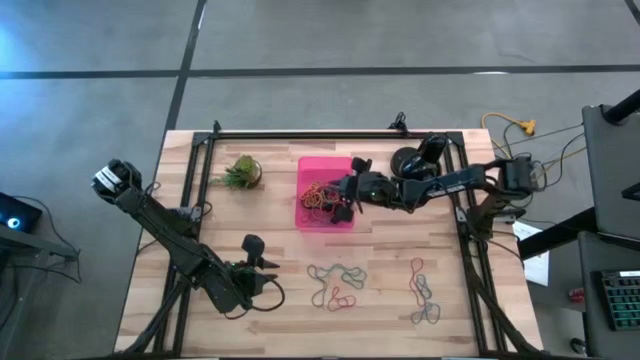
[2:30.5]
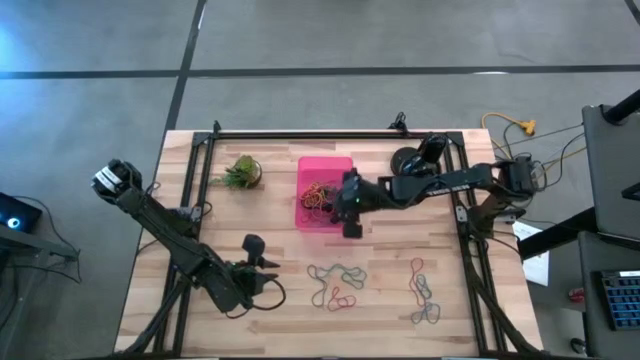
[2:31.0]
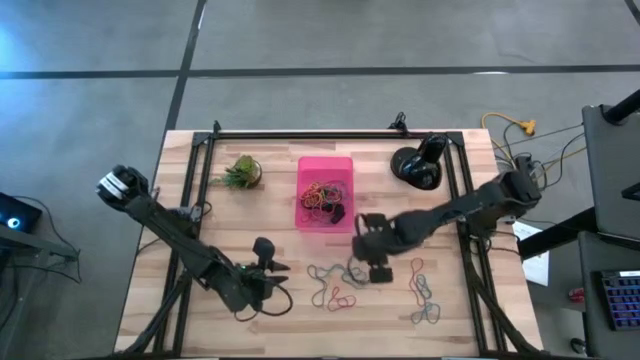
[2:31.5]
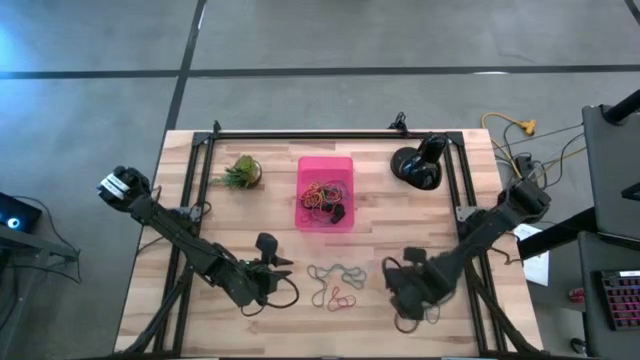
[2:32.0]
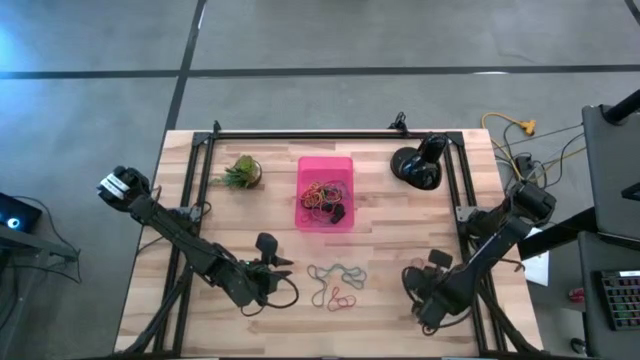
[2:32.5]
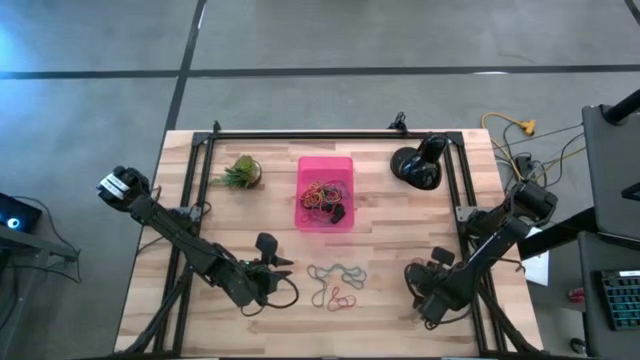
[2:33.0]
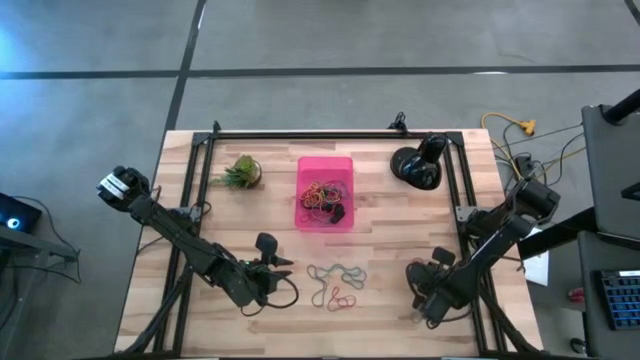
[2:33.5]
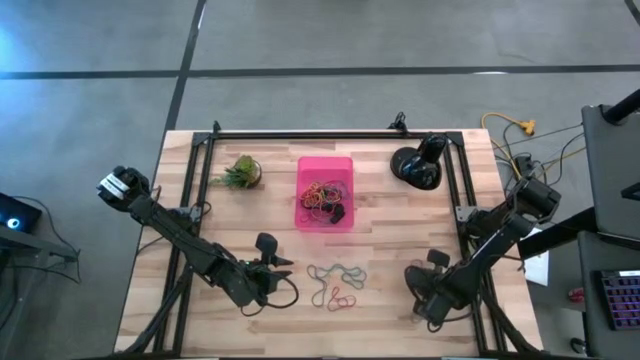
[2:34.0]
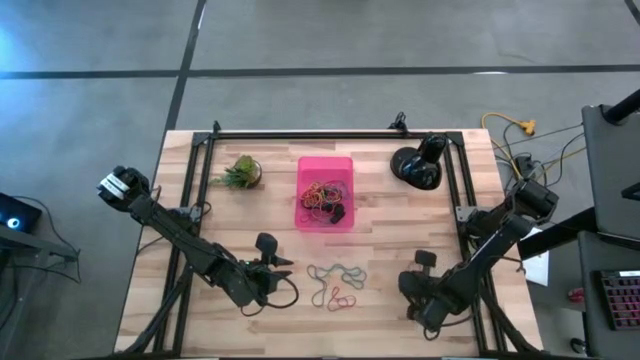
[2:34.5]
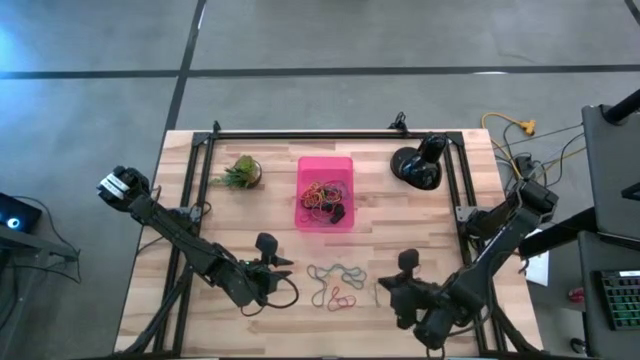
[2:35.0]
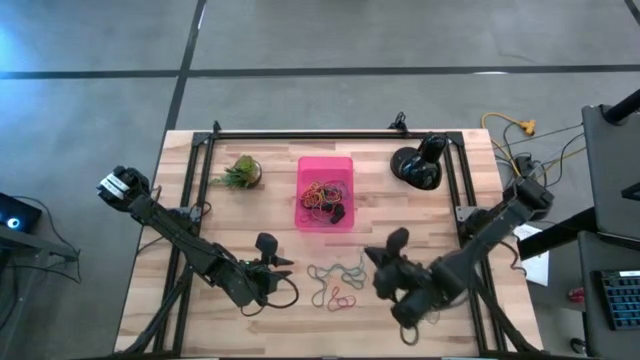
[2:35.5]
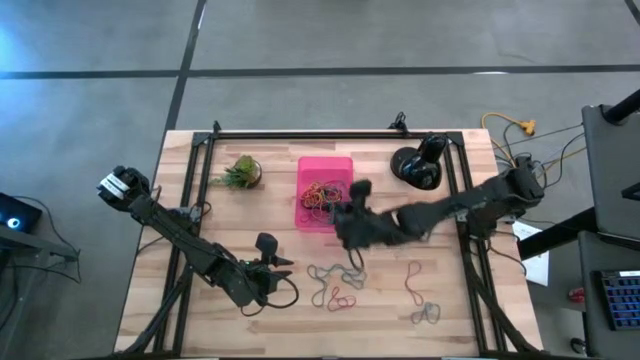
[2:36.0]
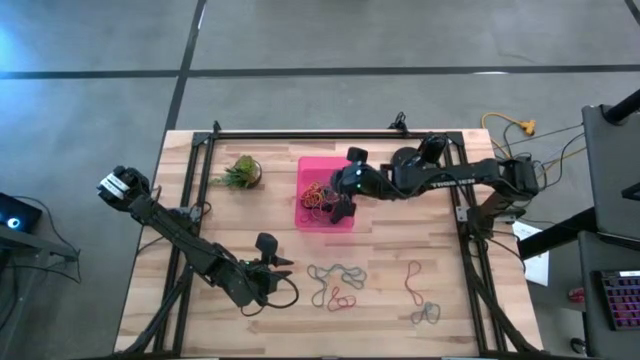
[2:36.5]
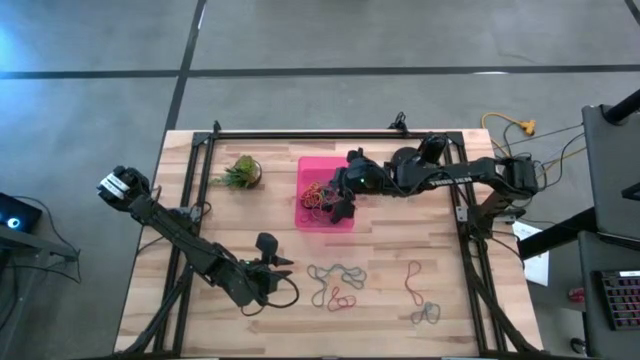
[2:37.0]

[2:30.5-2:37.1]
Task: Pick and place rubber bands into bin
Put the blue rubber bands into the pink bin

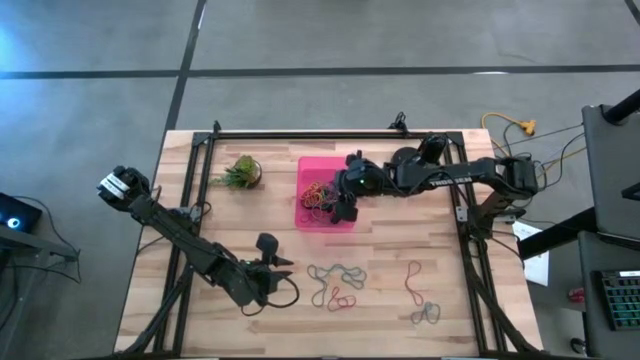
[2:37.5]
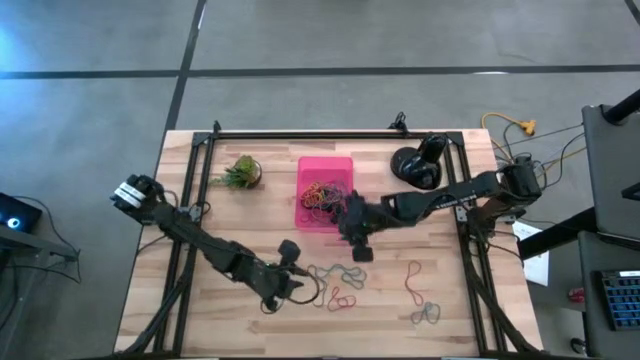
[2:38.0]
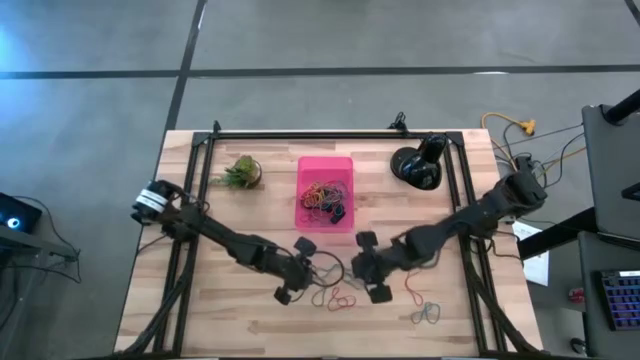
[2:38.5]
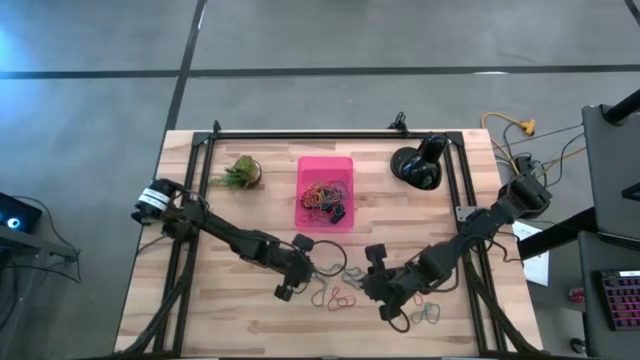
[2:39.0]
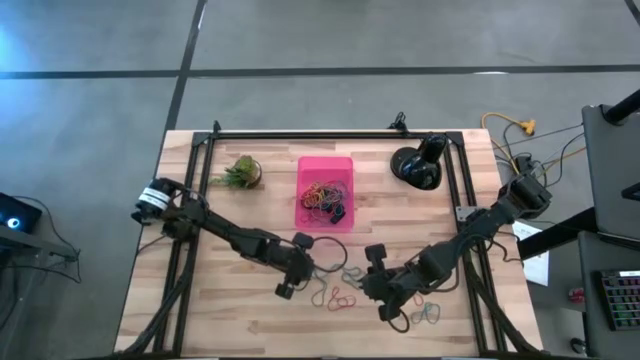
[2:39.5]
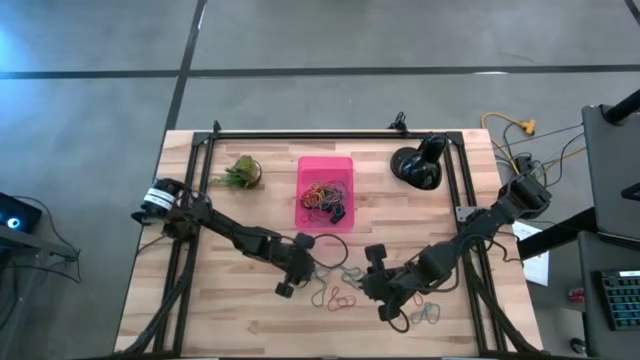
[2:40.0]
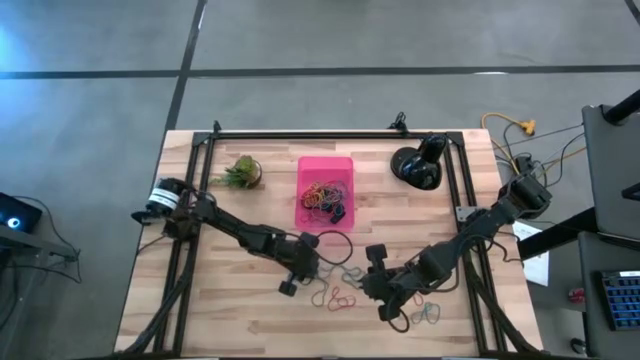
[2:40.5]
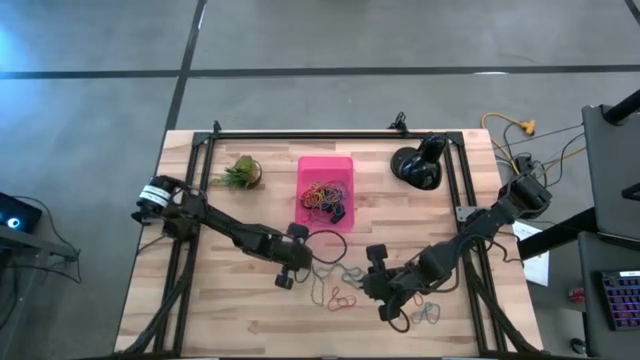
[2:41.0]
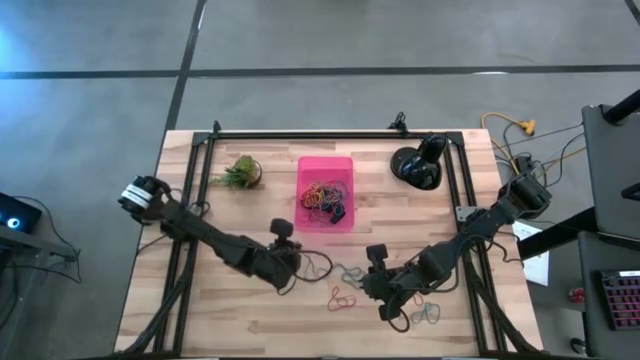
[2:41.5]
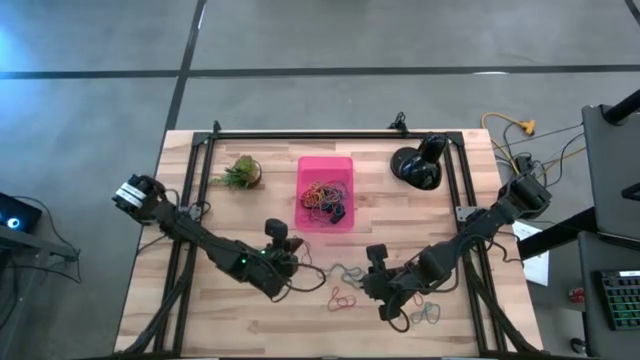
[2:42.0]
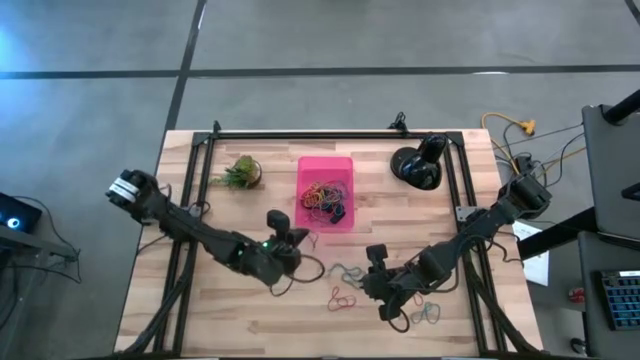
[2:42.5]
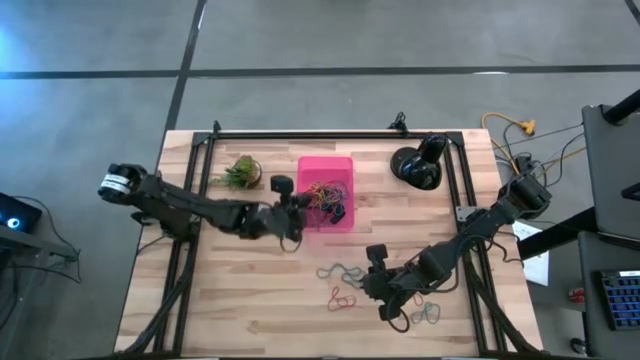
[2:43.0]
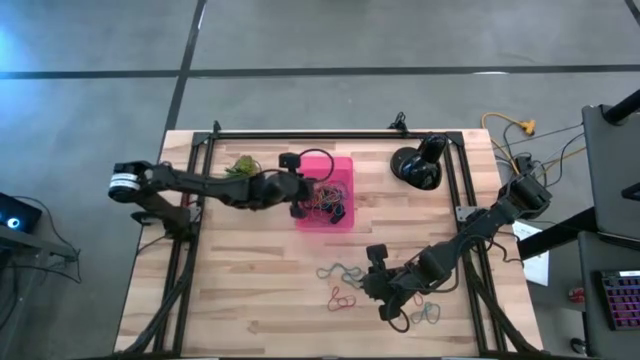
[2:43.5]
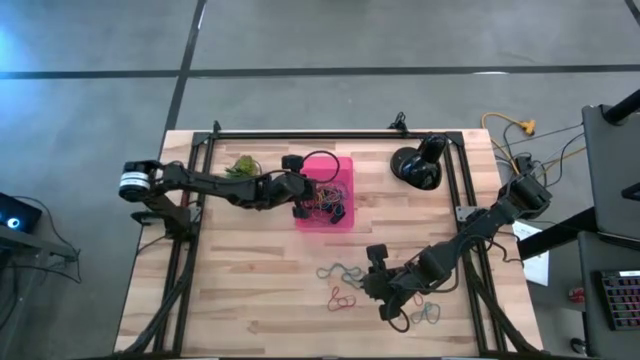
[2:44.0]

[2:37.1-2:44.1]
Put the purple rubber bands into the pink bin

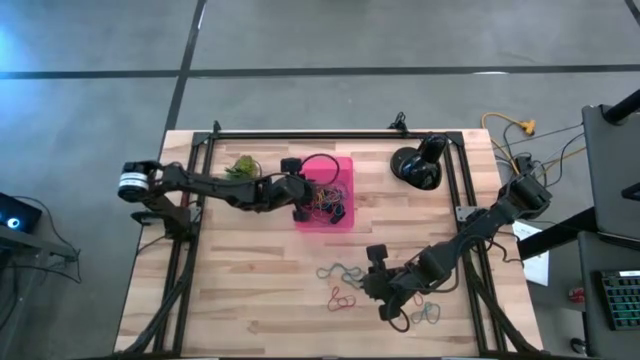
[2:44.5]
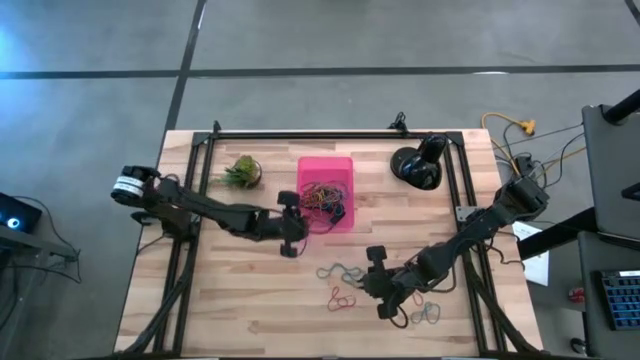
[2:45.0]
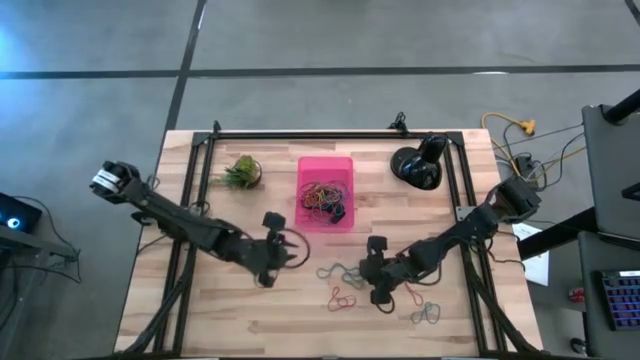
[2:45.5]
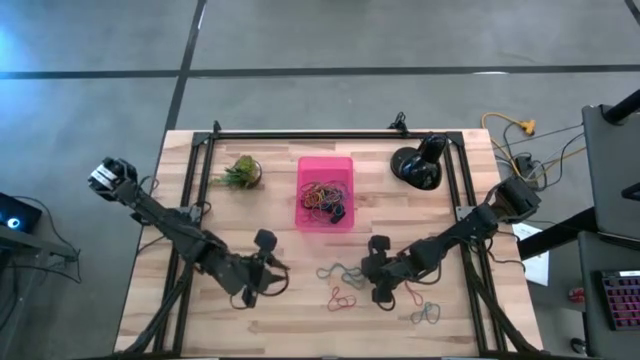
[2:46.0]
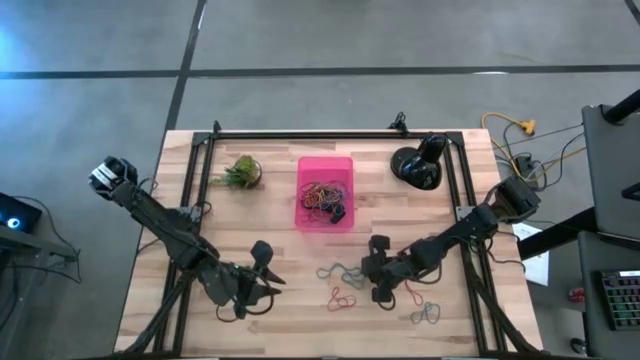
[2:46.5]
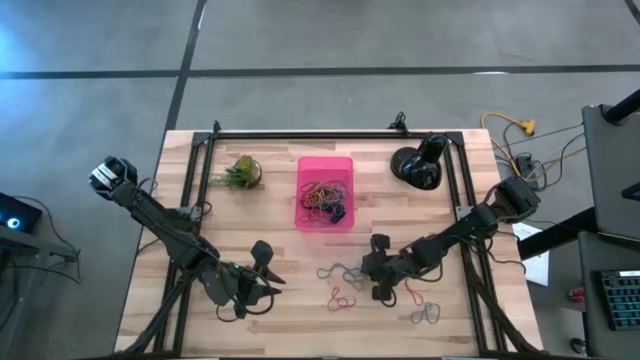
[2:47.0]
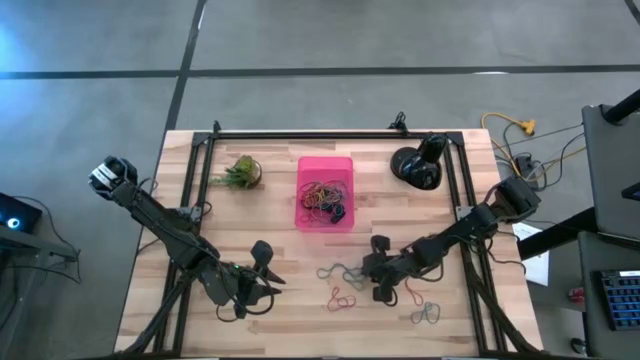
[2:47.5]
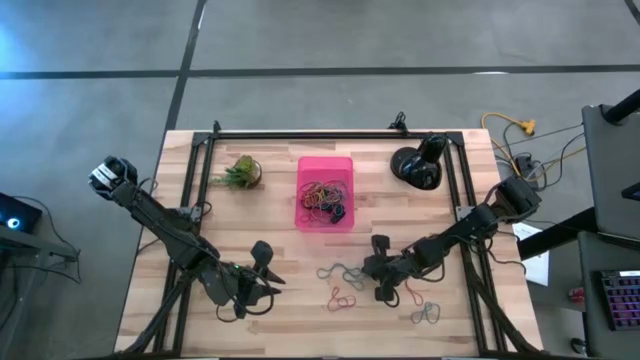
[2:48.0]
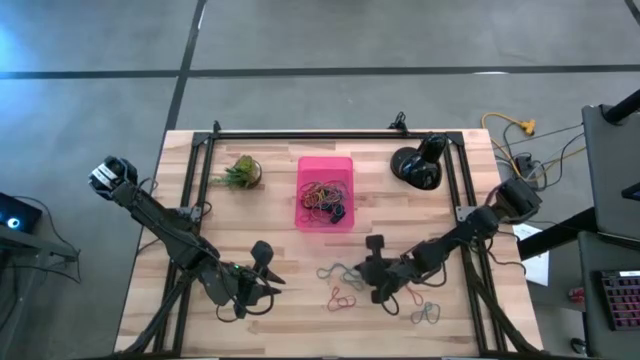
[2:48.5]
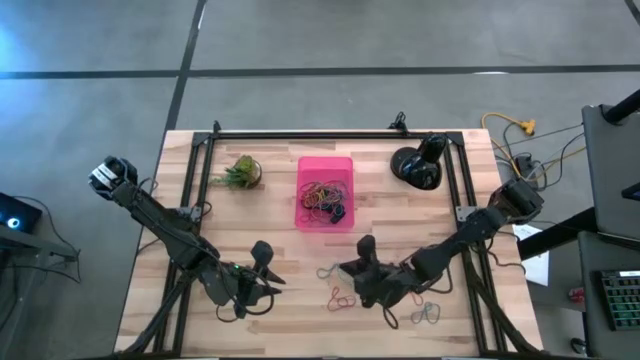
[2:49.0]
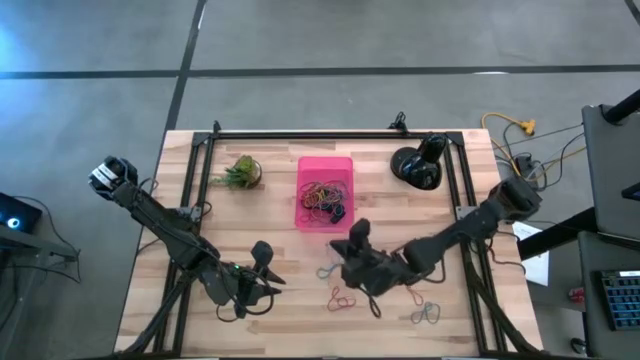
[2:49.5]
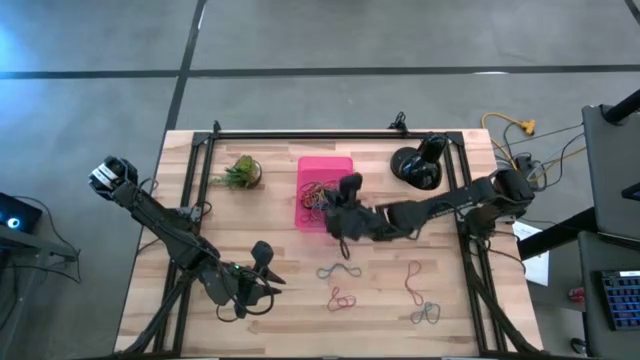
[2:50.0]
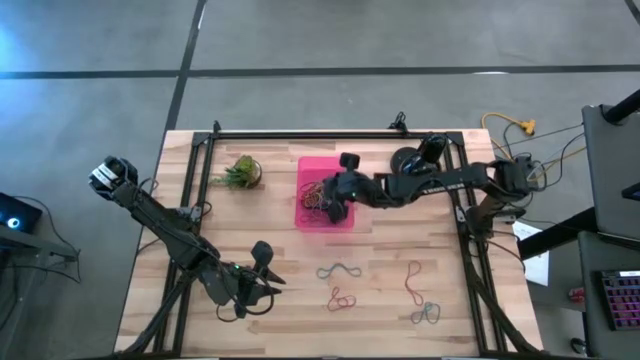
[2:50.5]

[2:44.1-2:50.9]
Put the blue rubber bands into the pink bin
